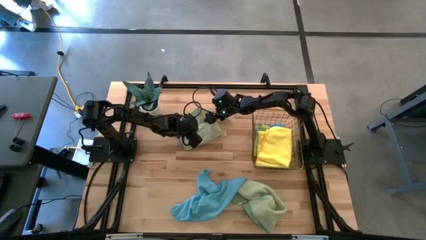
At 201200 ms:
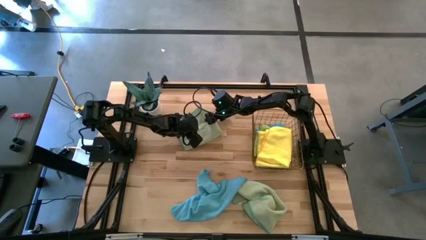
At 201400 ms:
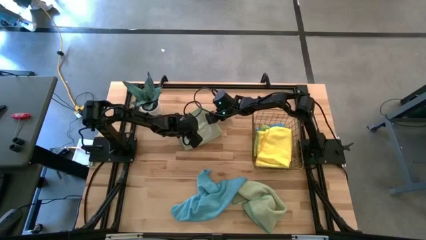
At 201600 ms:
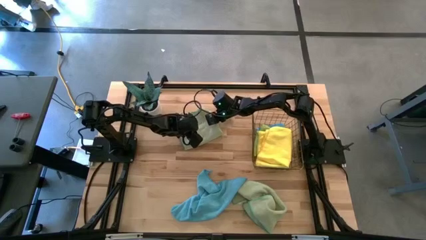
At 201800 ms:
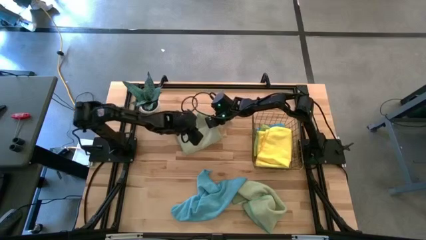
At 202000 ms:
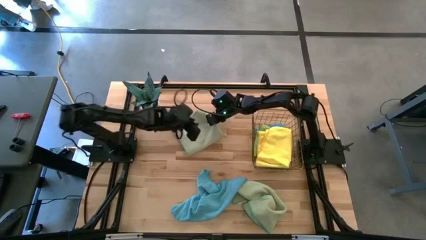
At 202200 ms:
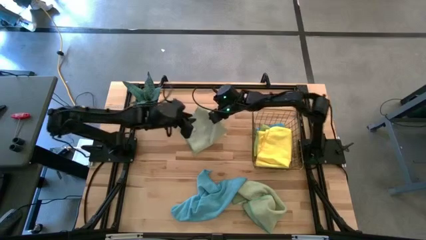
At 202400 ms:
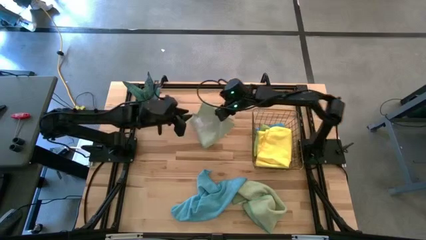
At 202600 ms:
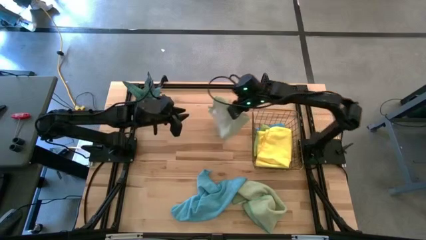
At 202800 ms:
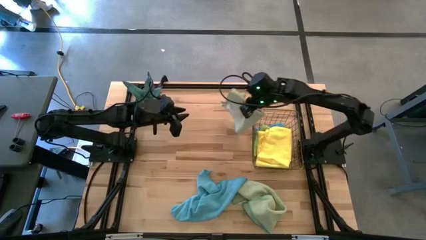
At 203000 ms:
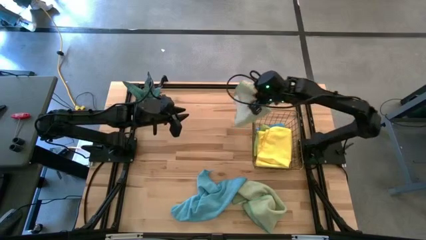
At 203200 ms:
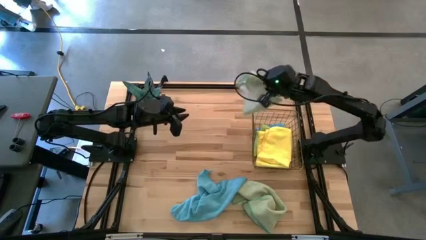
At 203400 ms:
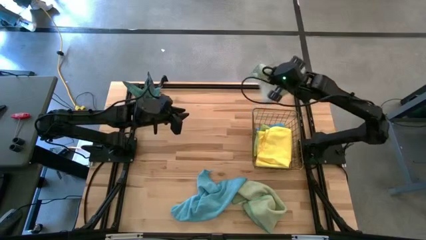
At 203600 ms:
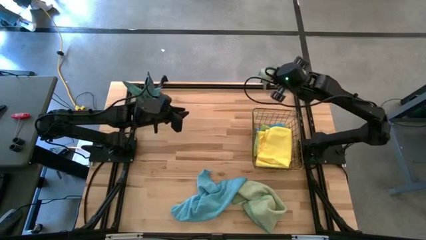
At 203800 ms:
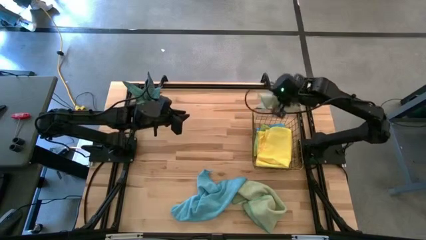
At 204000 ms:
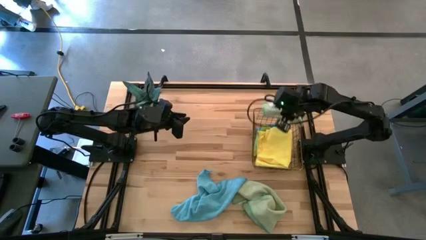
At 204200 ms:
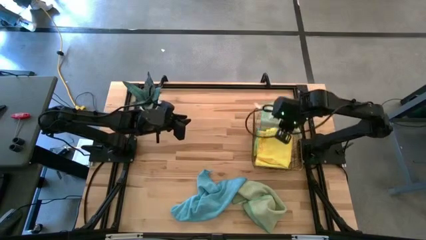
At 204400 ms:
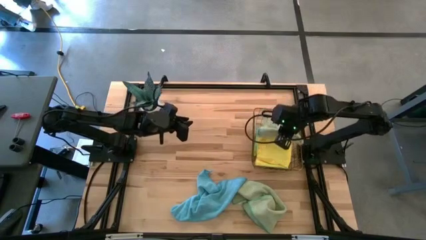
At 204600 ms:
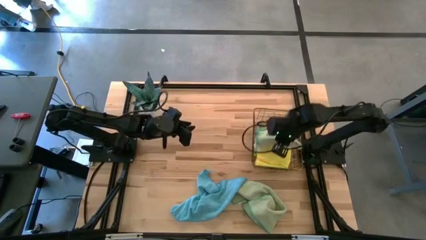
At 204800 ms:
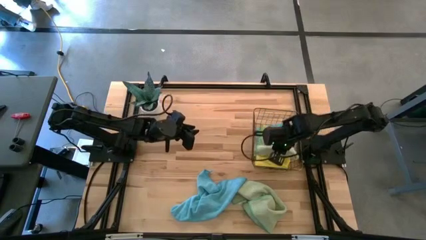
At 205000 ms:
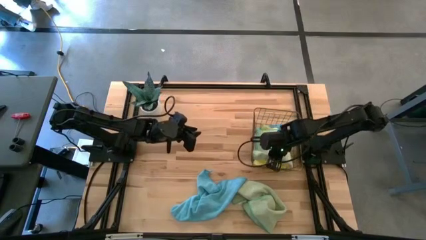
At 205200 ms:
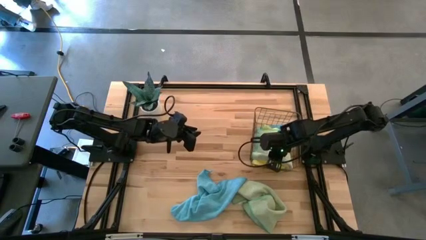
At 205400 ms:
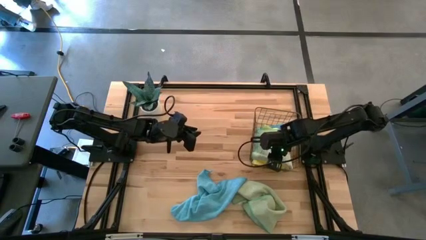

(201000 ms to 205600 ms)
Task: Fold microfiber towels
Stack the folded left green microfiber cloth into the wire basket

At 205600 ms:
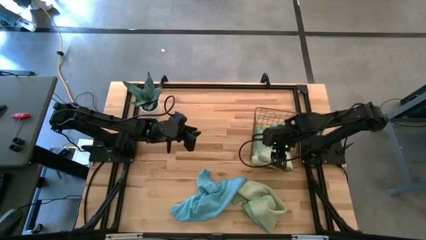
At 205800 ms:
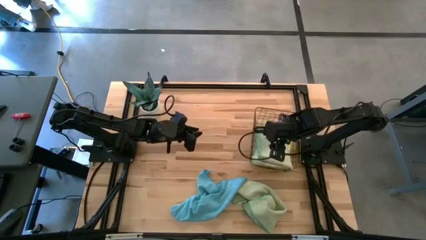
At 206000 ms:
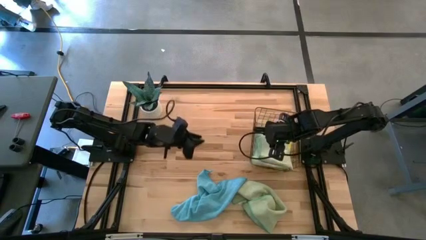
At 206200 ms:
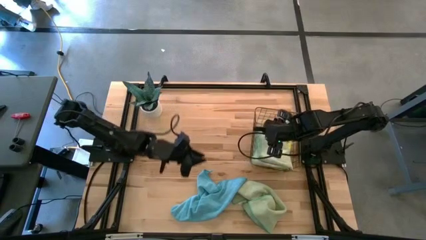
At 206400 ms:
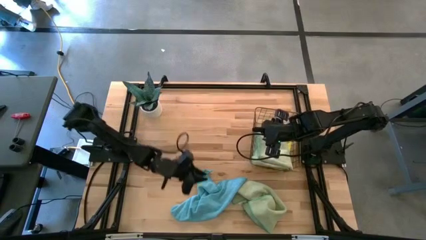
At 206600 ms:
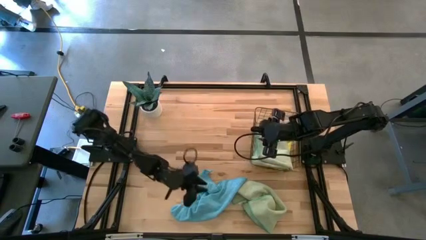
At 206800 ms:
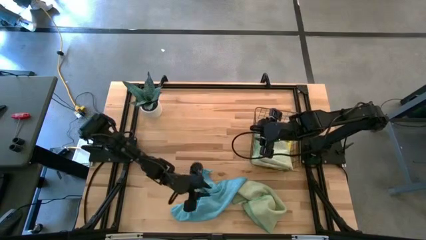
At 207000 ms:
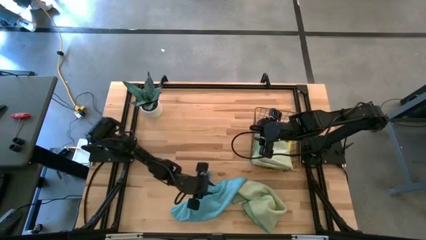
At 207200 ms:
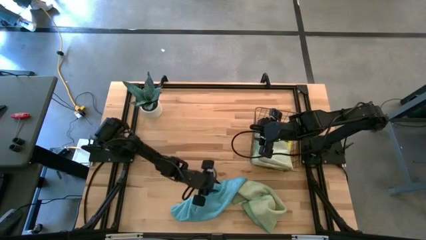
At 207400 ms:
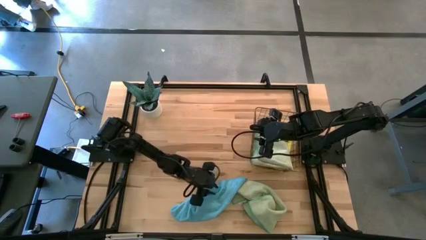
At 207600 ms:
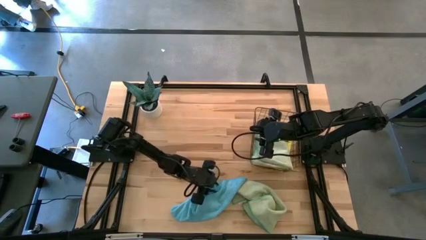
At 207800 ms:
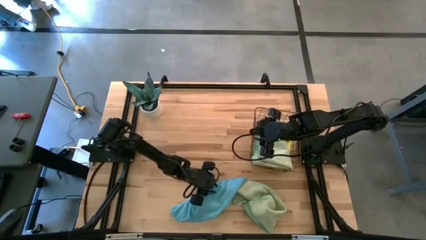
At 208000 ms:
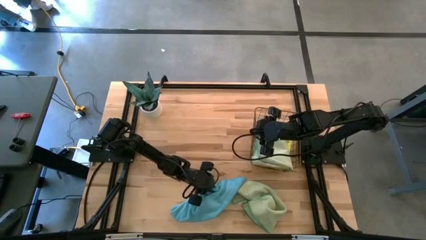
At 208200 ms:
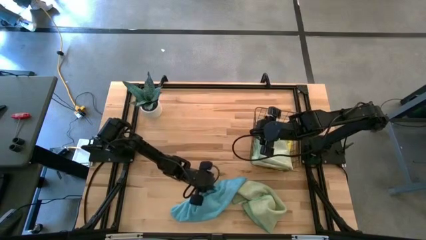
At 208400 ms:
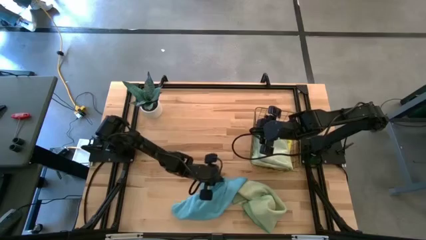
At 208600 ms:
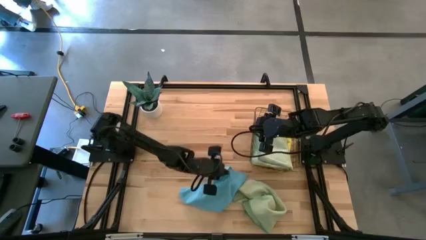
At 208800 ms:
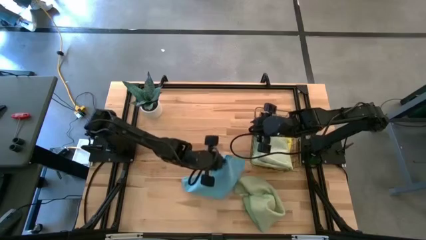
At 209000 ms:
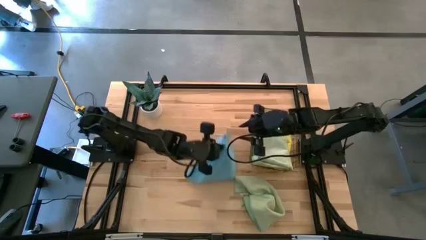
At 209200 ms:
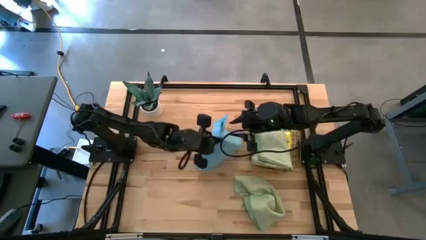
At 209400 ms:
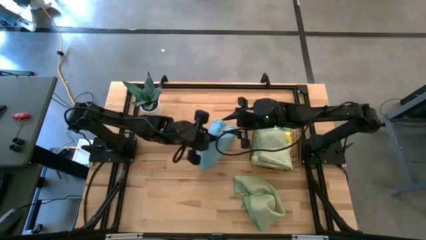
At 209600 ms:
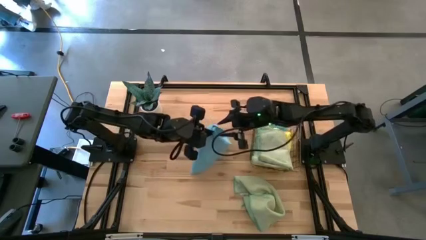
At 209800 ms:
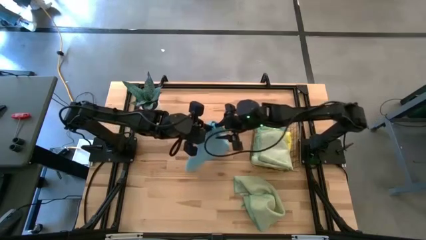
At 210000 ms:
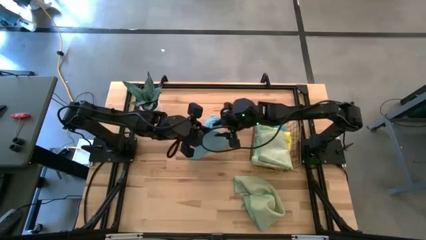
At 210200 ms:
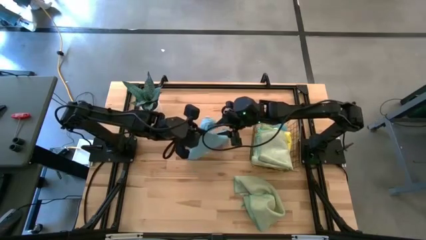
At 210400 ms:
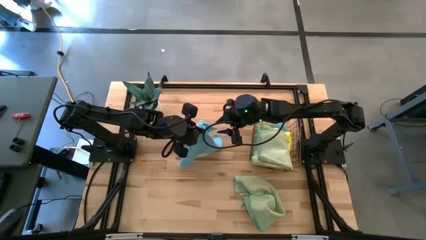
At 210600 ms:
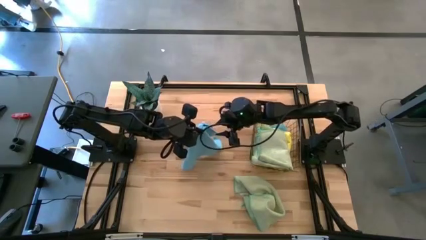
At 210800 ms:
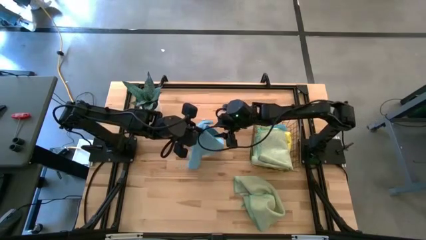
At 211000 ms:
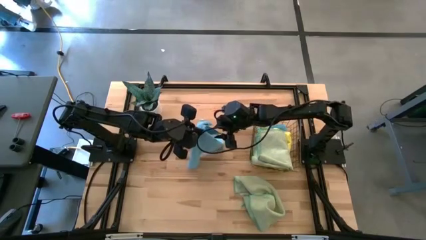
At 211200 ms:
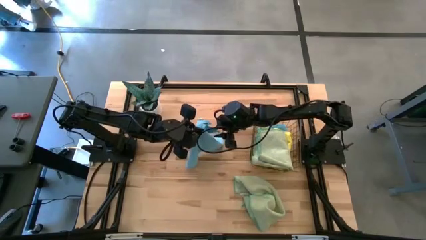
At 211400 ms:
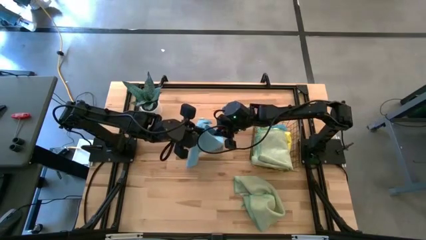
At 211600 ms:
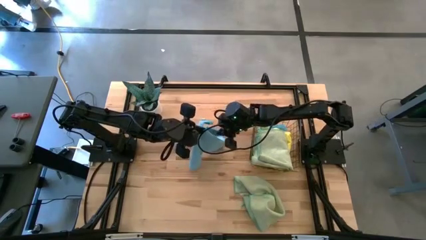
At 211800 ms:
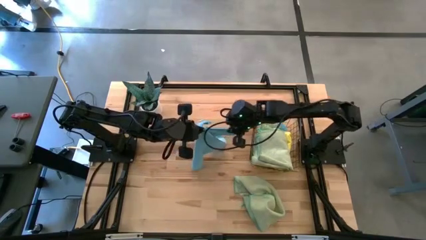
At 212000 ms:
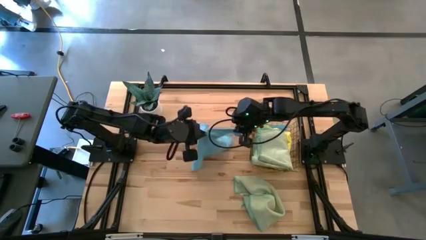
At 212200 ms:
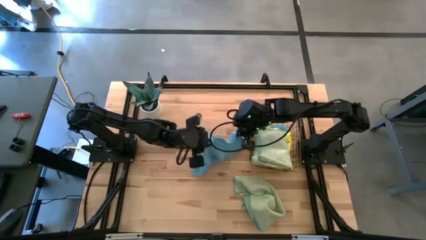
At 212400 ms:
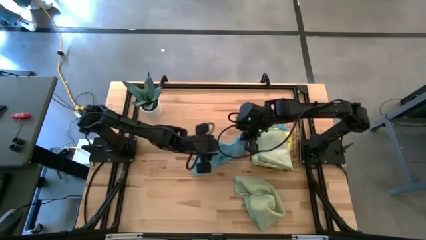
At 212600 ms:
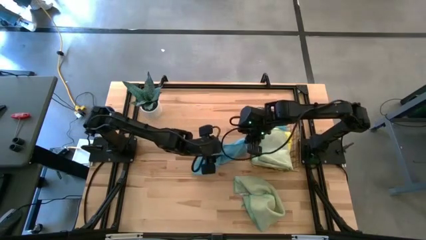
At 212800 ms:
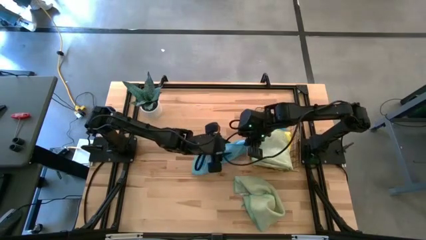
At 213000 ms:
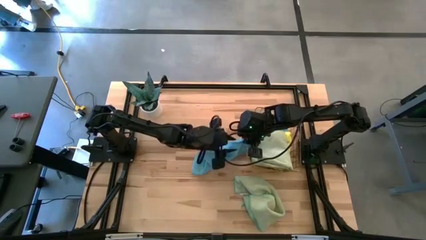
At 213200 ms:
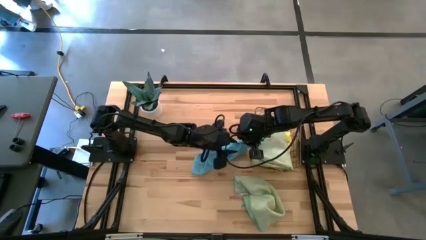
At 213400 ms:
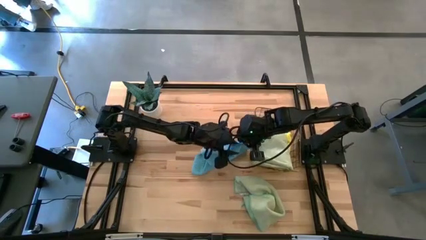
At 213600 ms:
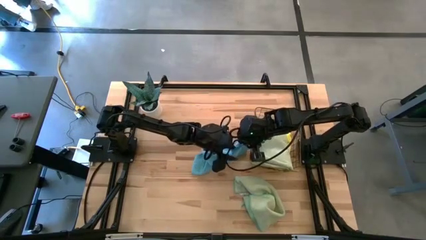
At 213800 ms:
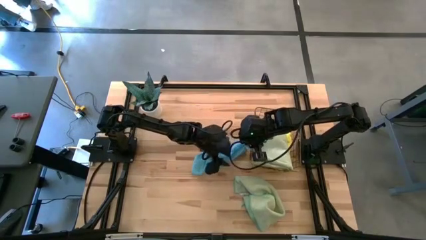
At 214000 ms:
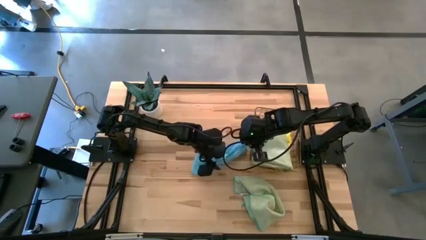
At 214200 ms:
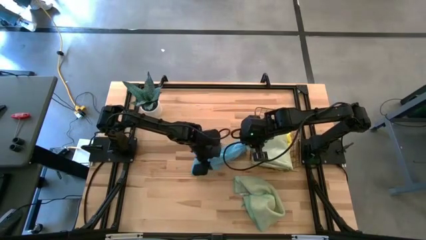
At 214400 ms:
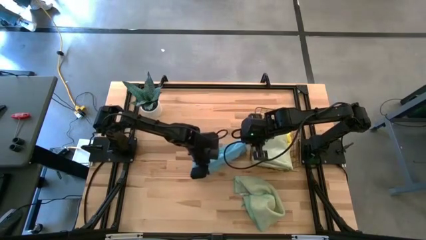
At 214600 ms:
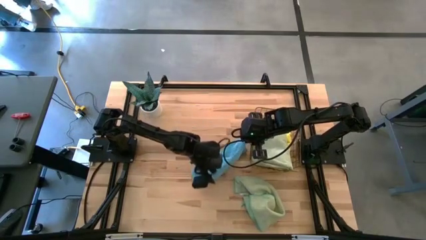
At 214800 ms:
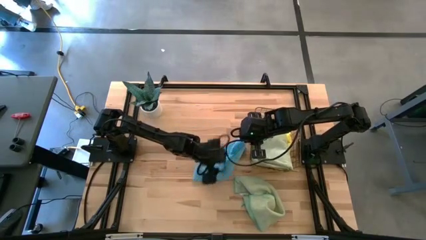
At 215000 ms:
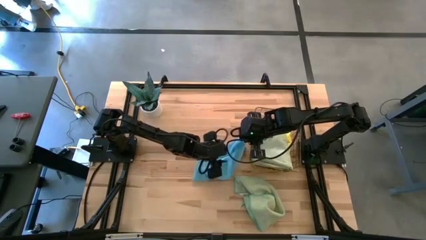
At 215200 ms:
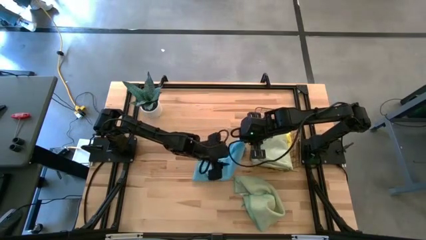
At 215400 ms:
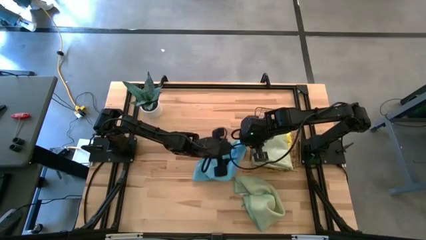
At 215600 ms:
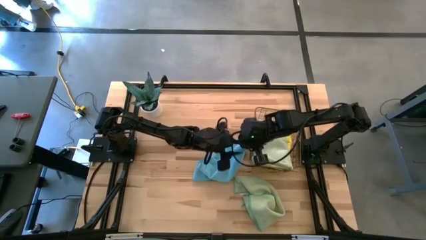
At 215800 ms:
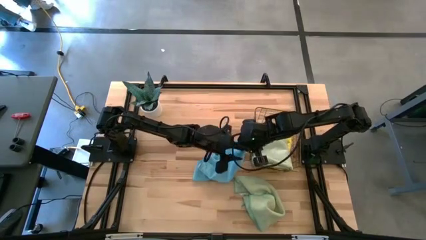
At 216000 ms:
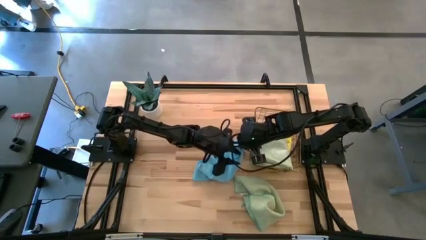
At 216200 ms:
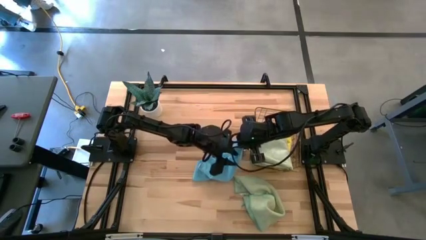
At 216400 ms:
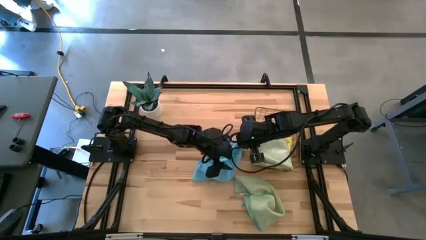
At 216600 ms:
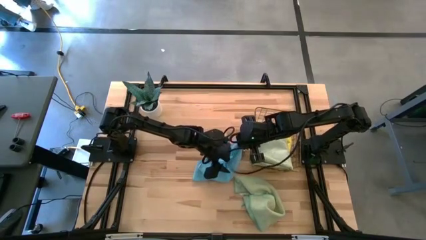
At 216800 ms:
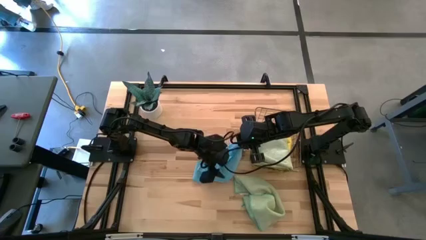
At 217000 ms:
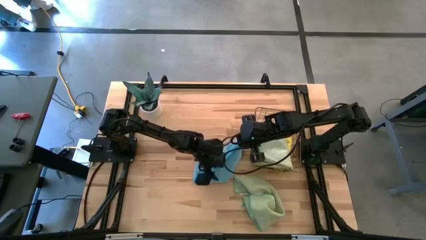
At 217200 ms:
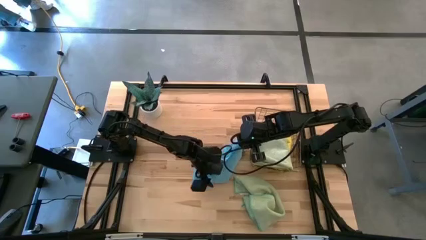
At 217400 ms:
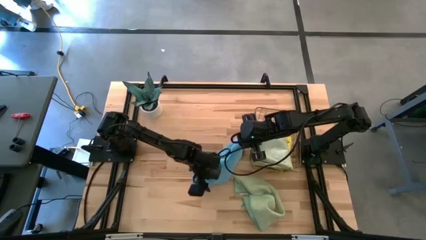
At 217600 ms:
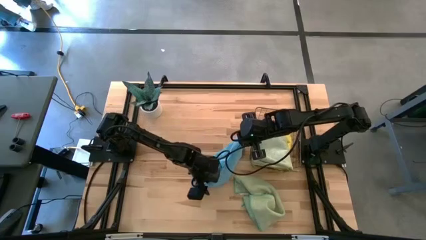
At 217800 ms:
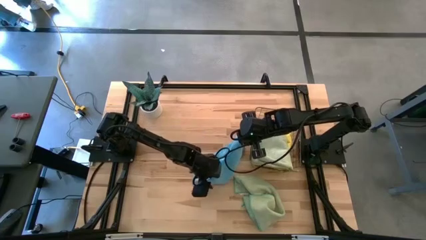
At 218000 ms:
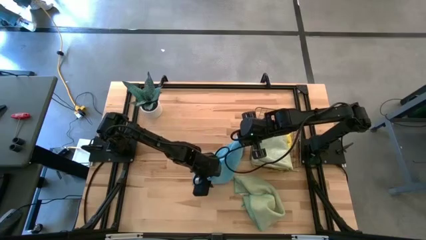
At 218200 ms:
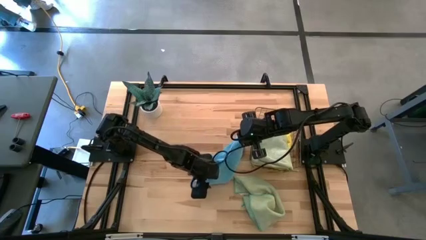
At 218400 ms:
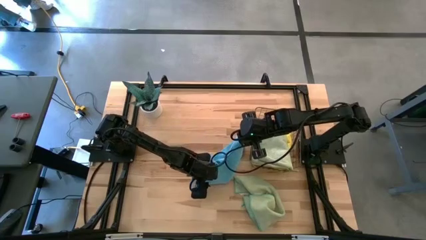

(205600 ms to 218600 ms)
Fold the blue microfiber cloth
